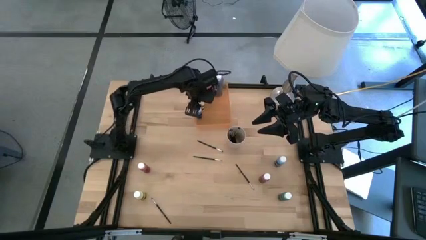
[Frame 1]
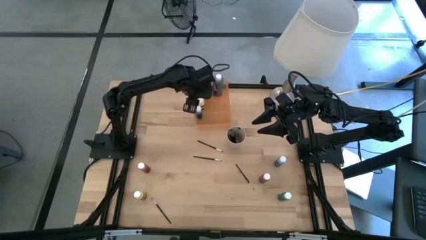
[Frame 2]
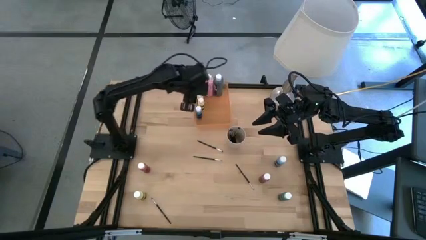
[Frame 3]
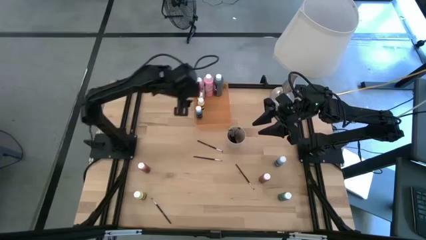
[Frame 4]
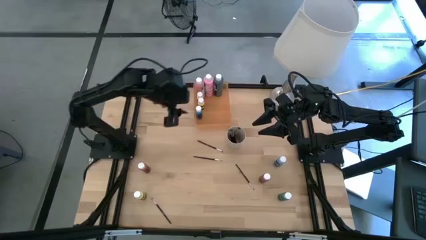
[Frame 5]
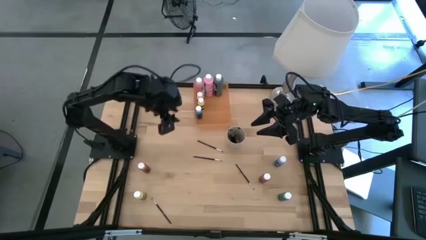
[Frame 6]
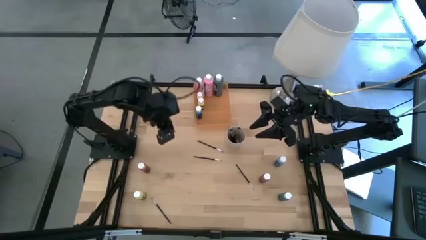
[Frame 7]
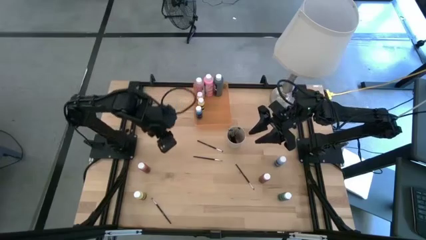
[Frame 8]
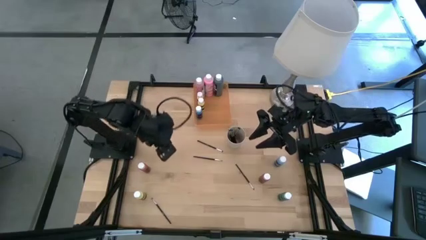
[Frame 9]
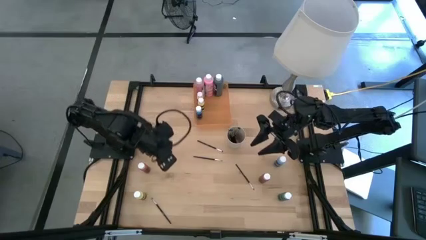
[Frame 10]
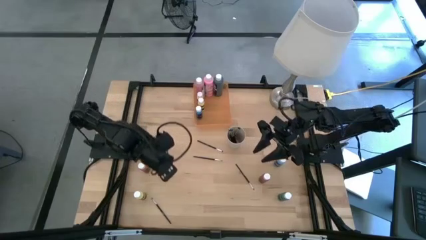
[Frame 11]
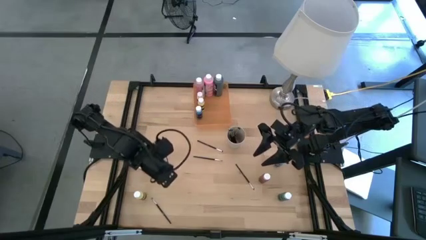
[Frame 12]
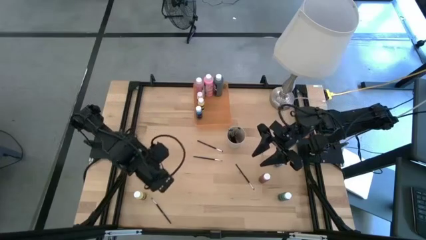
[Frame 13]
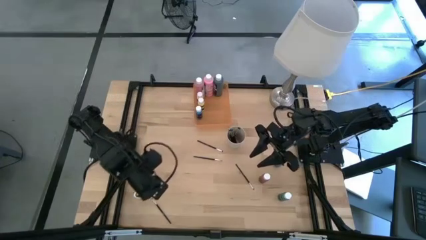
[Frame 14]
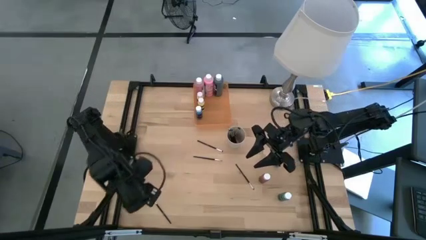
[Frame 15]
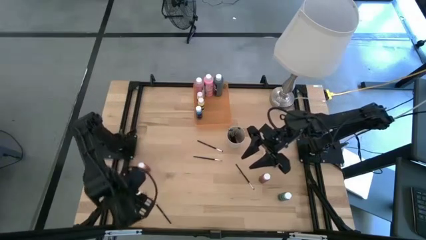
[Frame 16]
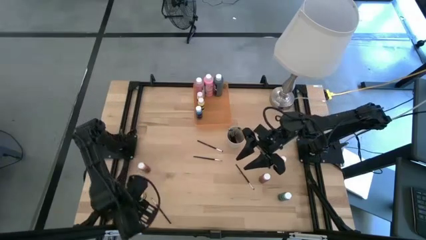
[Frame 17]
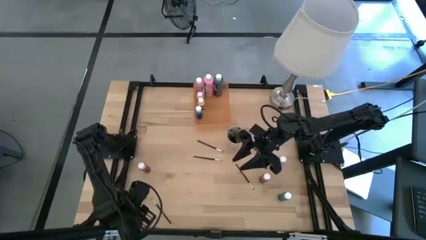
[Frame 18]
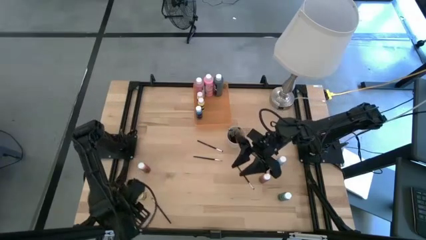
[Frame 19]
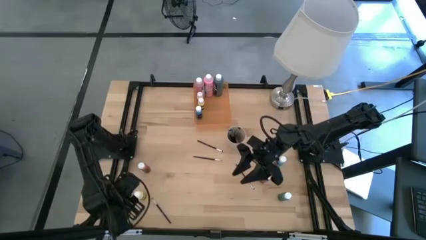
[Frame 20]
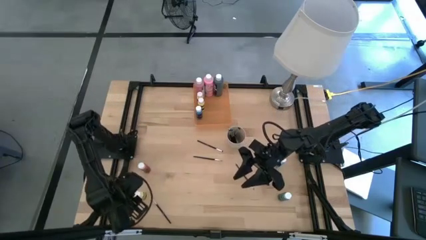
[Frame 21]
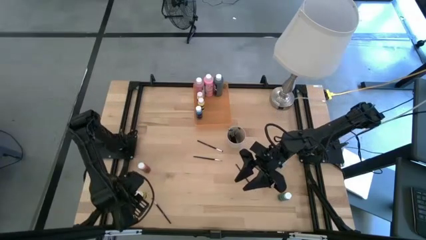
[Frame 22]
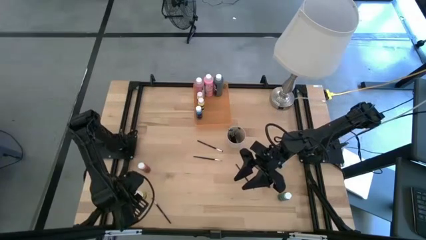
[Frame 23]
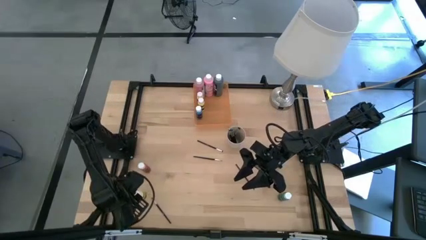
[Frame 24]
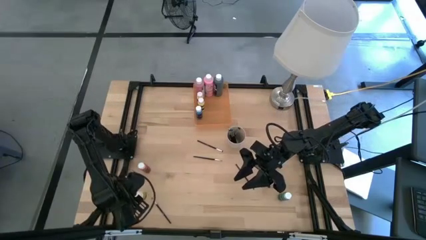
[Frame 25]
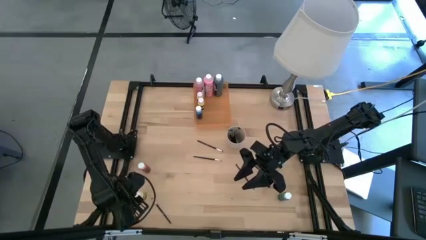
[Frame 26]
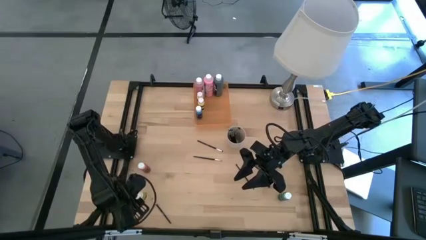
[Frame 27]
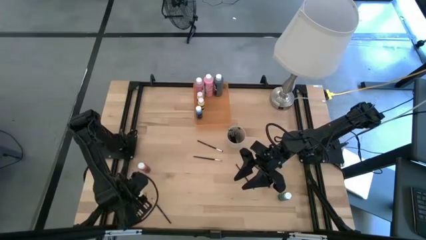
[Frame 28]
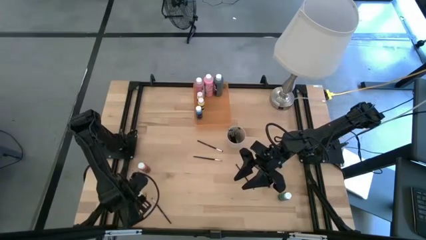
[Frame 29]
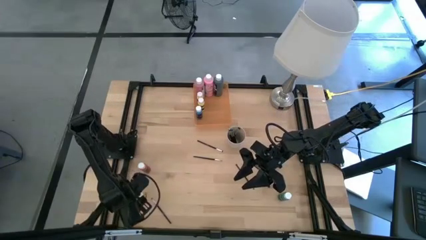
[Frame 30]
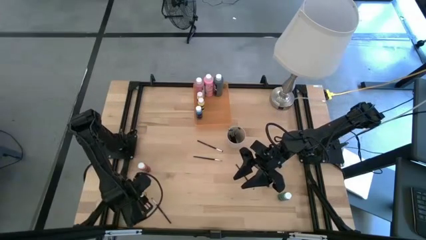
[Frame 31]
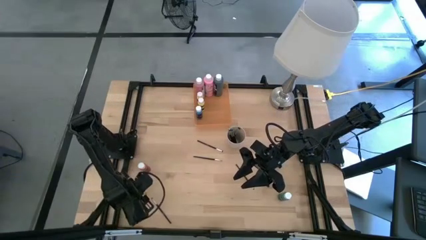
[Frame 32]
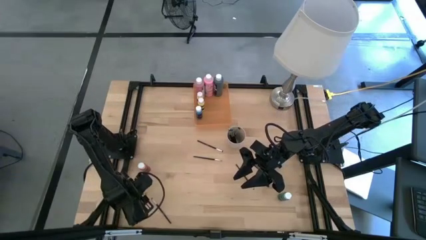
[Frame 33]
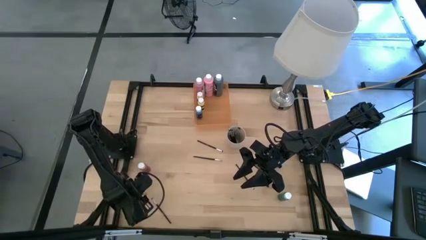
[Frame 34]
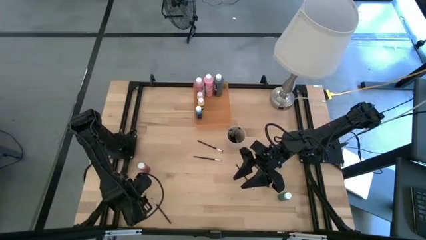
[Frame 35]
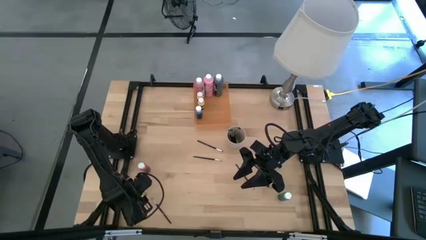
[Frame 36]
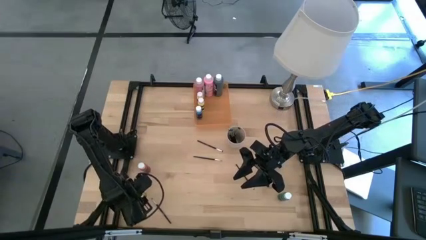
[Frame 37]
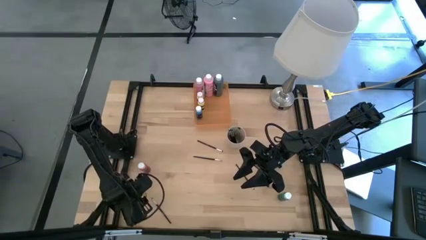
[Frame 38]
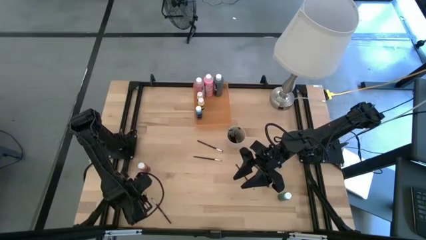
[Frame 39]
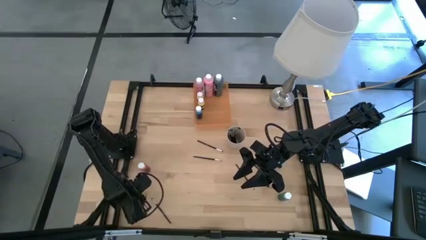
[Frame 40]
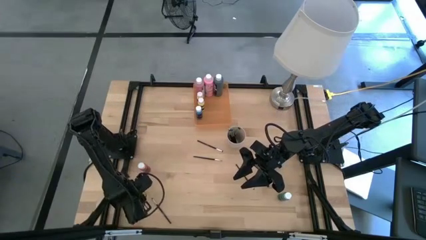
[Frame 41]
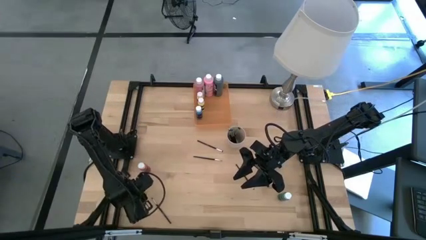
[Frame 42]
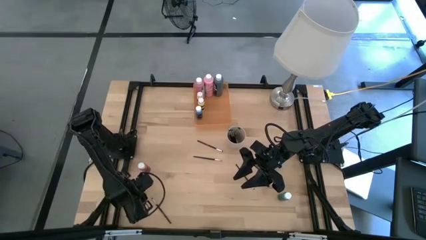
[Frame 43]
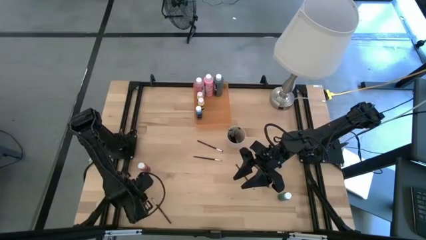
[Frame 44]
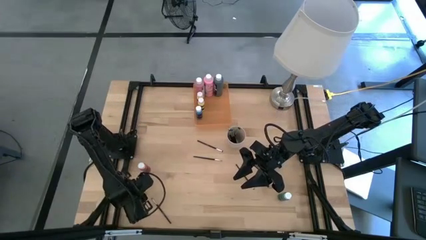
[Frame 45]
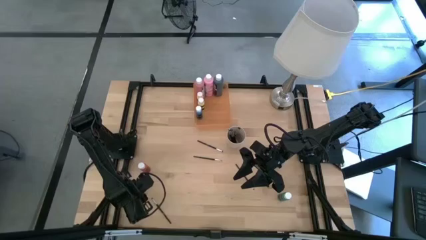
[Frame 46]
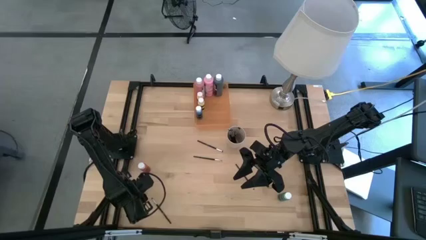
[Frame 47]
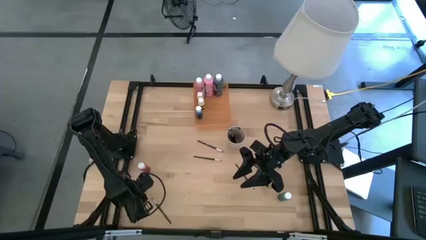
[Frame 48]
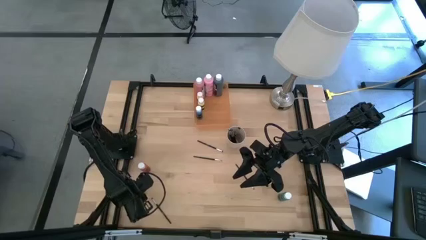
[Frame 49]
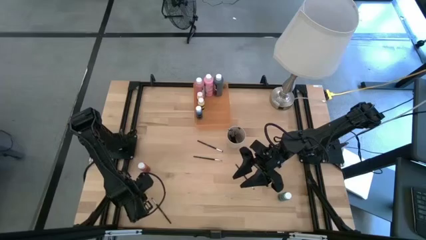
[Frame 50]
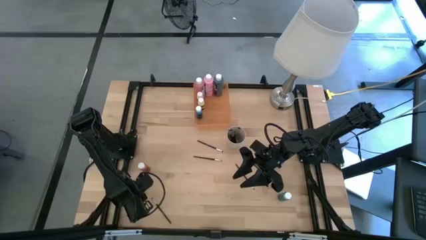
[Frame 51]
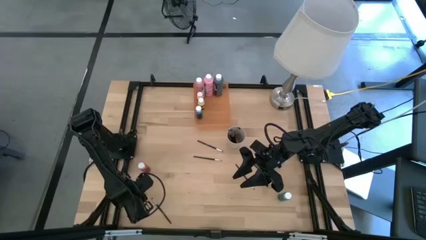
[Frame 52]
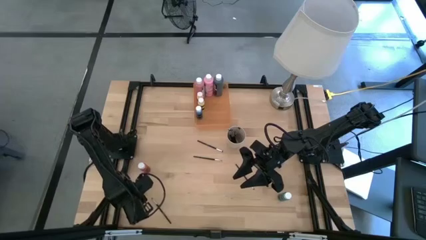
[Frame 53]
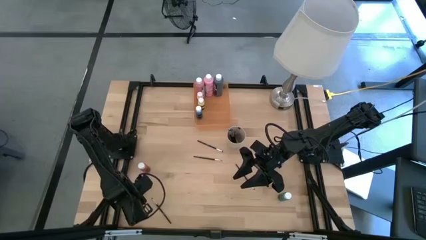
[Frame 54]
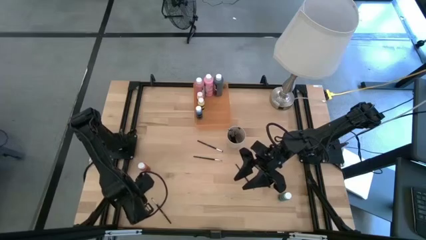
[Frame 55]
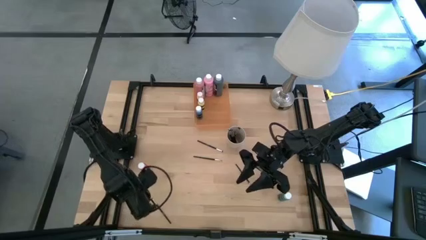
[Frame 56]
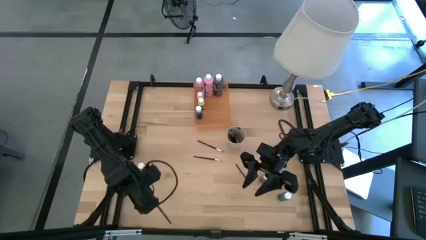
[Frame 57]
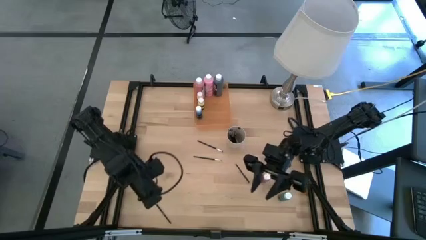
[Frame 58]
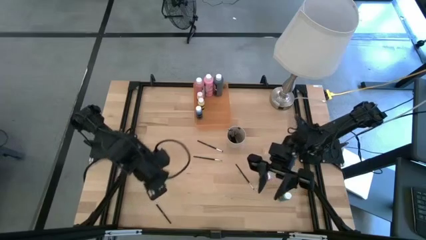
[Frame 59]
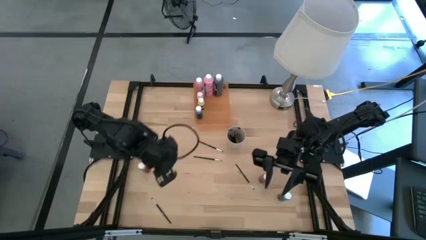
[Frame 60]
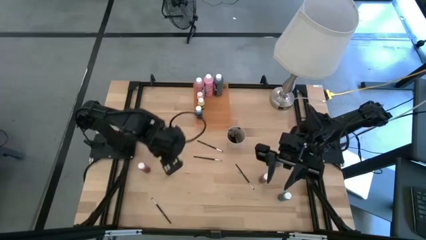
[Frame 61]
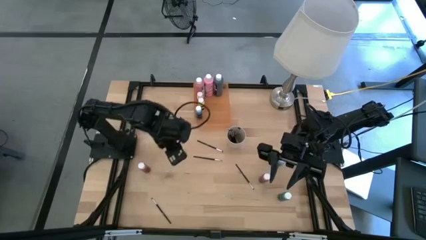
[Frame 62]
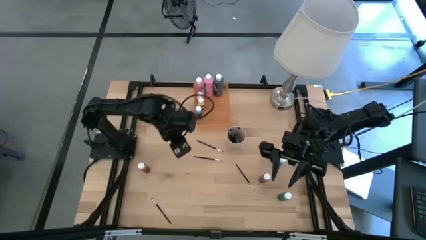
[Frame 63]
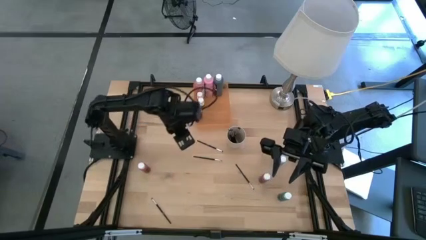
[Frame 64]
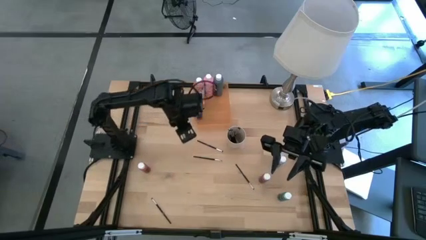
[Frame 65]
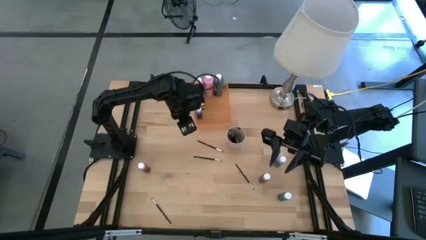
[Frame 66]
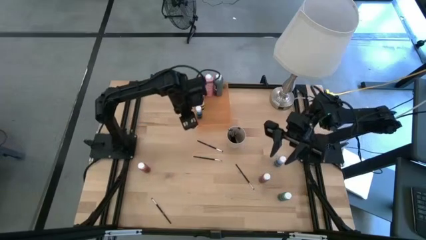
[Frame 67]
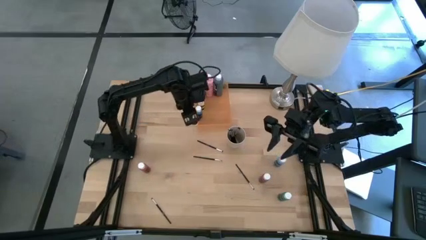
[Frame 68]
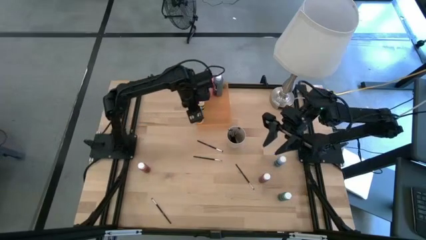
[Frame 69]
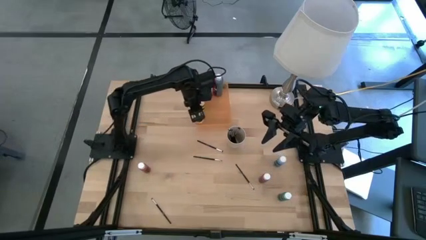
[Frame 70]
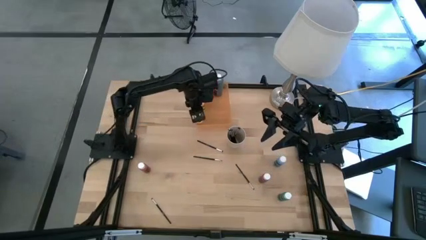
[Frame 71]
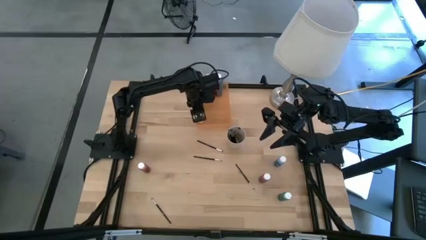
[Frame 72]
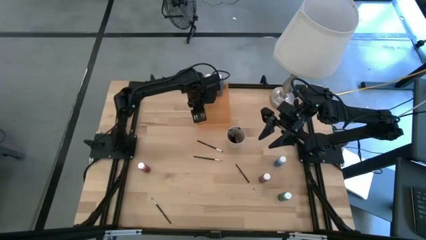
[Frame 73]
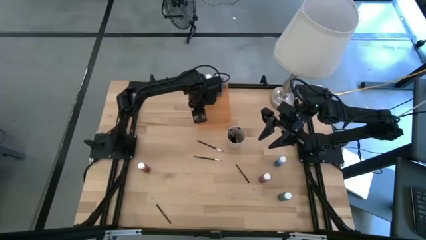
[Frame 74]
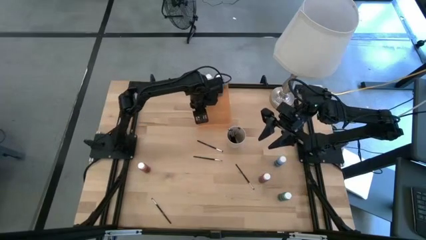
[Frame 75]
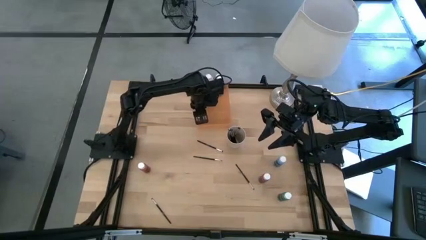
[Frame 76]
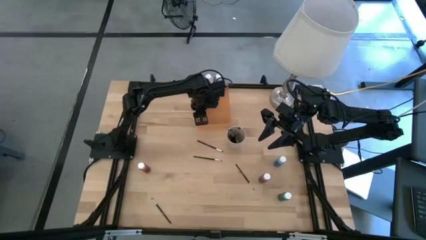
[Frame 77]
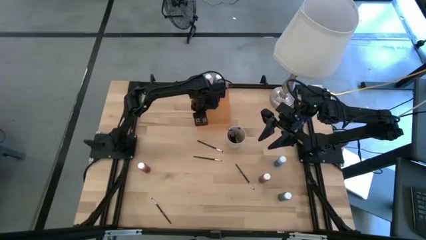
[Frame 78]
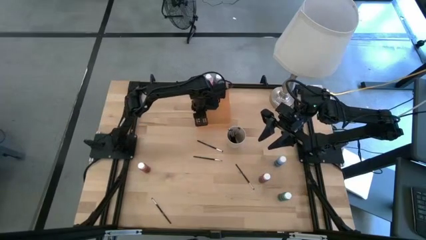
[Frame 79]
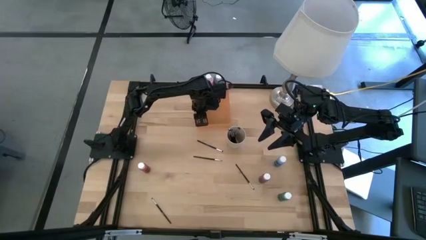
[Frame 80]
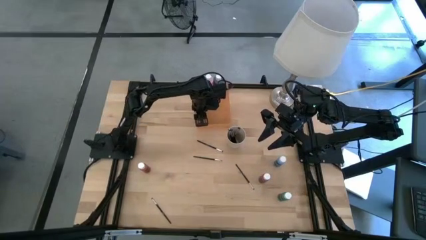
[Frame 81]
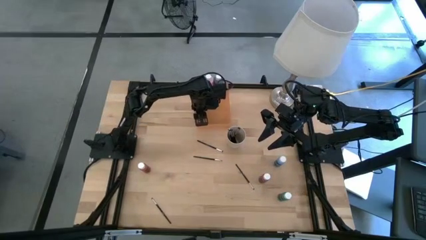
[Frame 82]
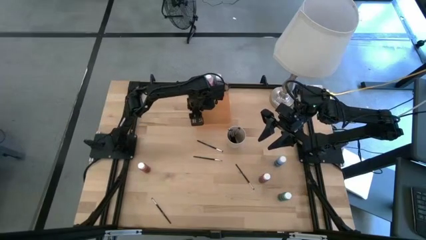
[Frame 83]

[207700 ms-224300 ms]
Task: Pick & Place Paint Supplies
Put the light yellow paint bottle into the orange bin
